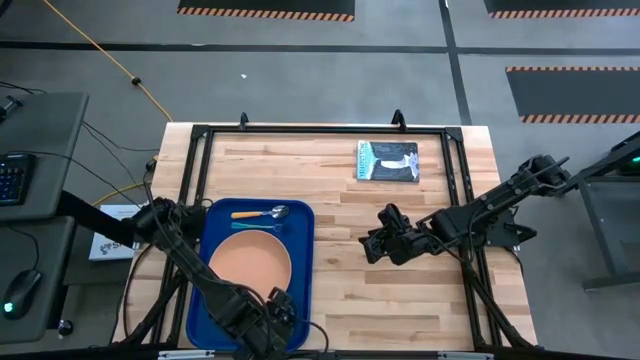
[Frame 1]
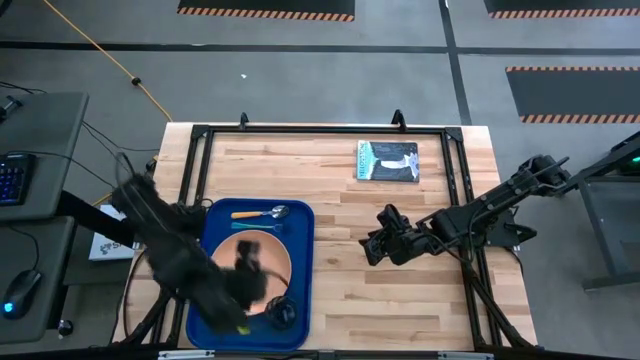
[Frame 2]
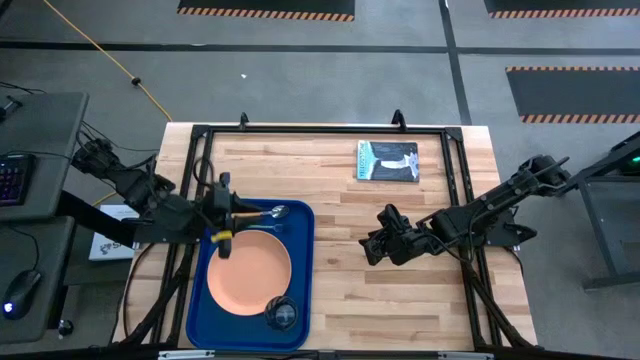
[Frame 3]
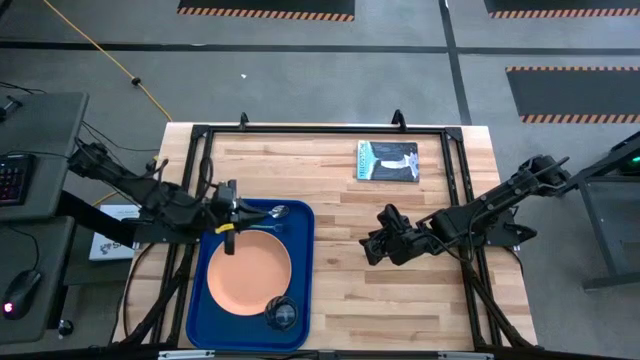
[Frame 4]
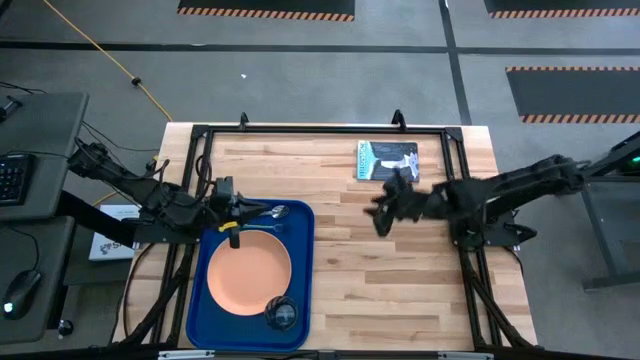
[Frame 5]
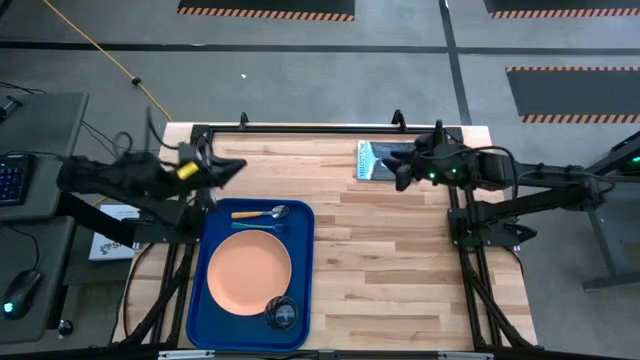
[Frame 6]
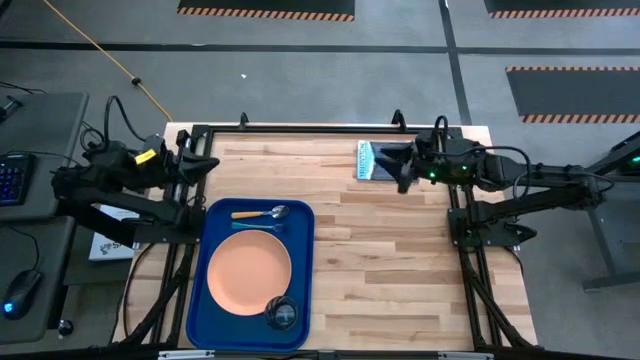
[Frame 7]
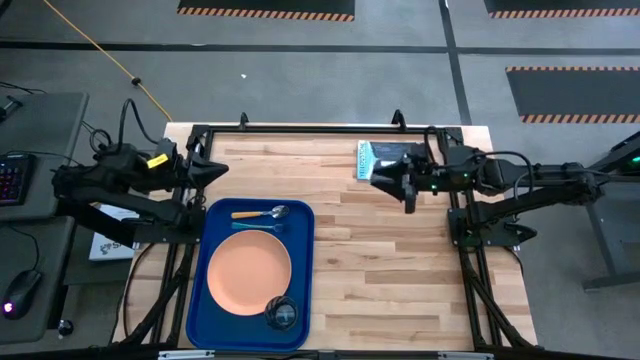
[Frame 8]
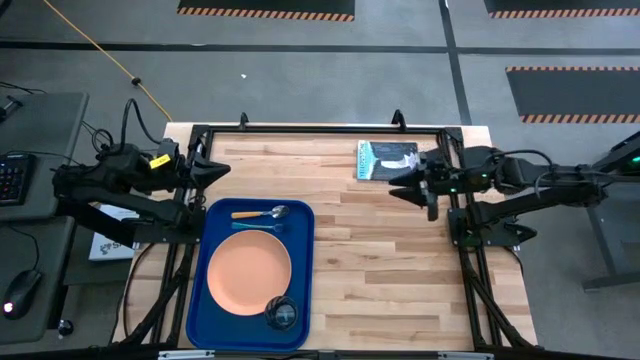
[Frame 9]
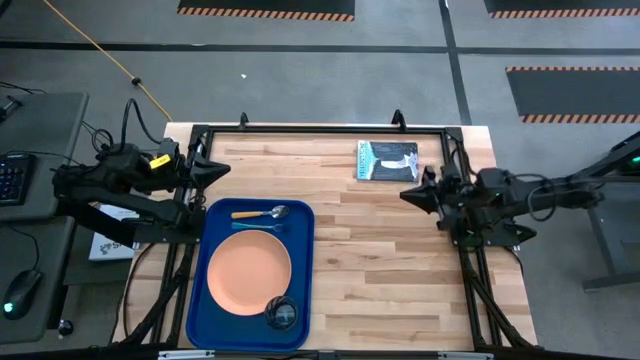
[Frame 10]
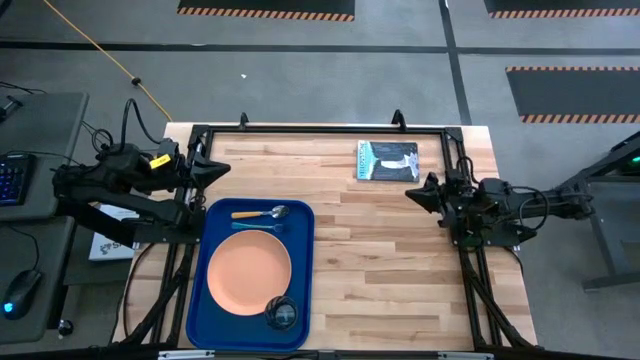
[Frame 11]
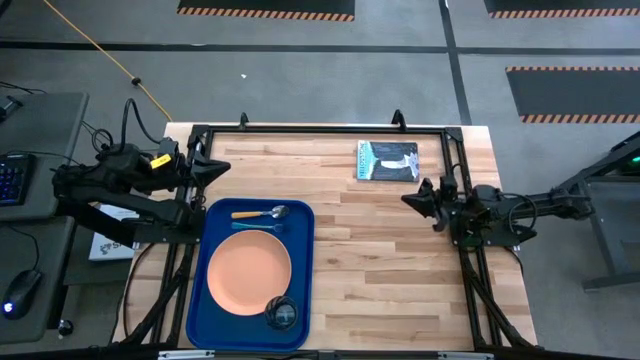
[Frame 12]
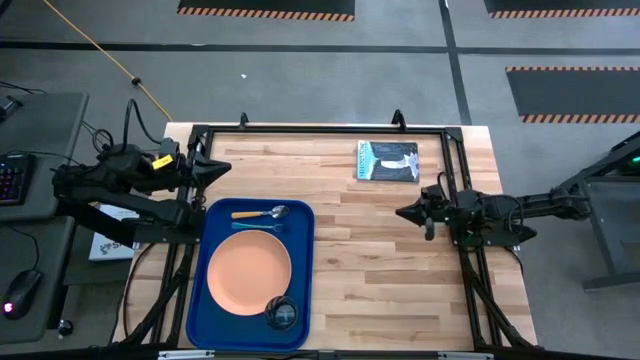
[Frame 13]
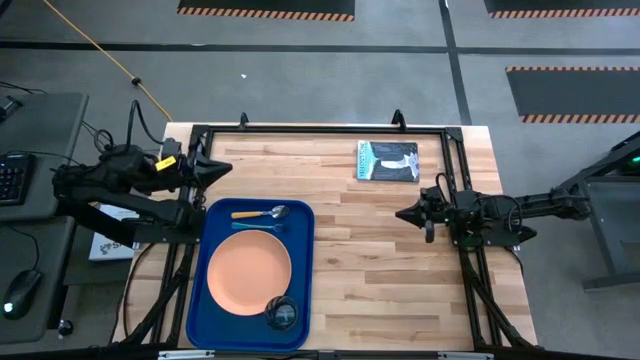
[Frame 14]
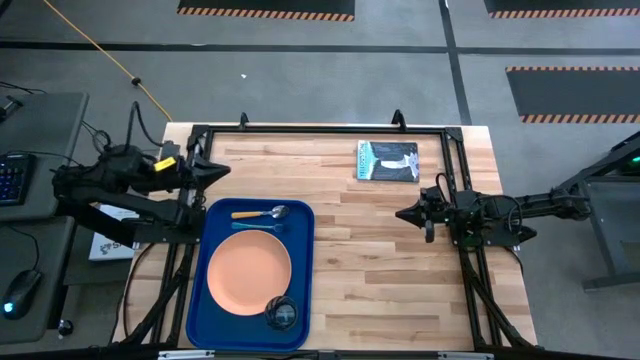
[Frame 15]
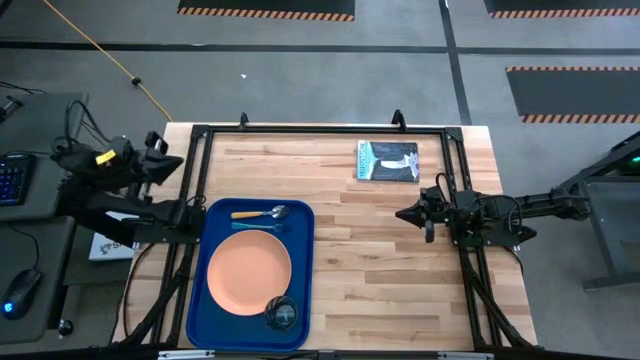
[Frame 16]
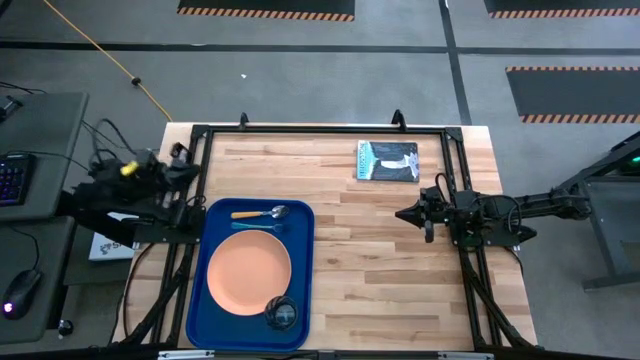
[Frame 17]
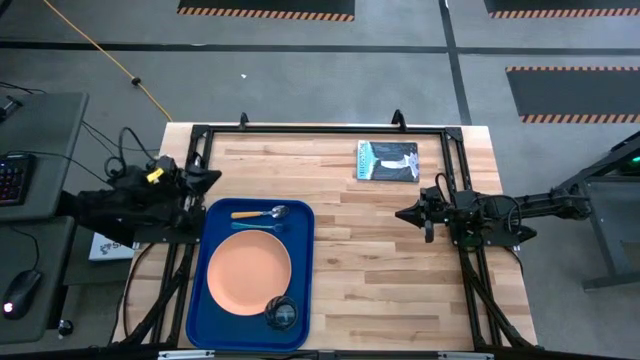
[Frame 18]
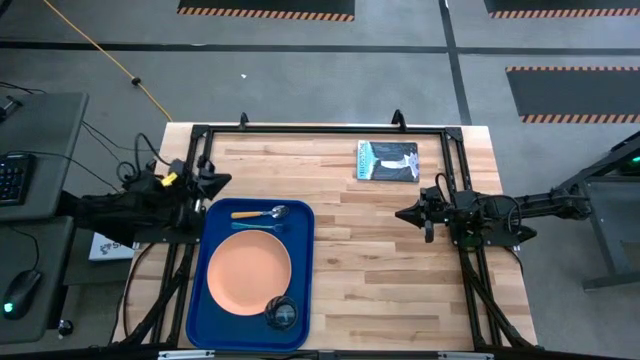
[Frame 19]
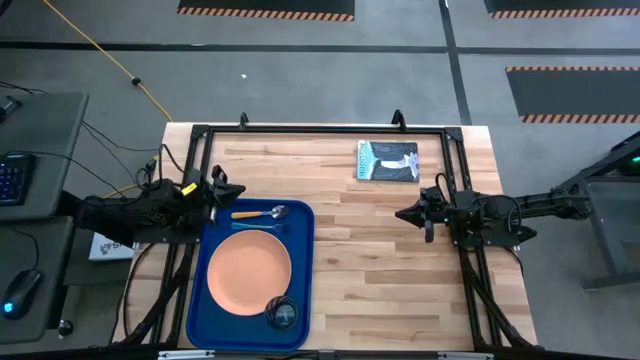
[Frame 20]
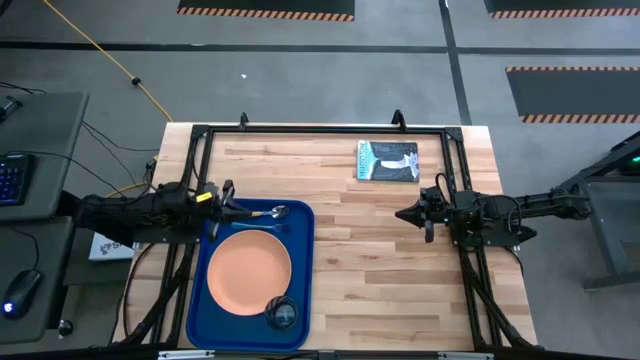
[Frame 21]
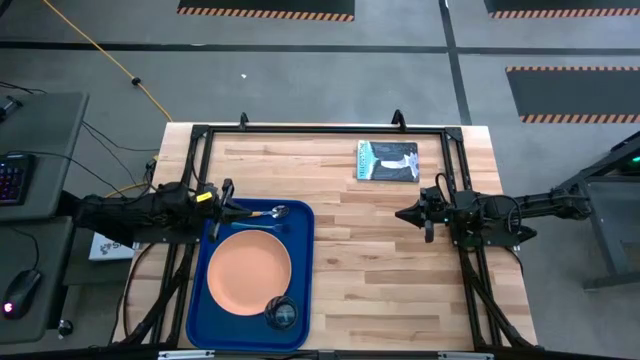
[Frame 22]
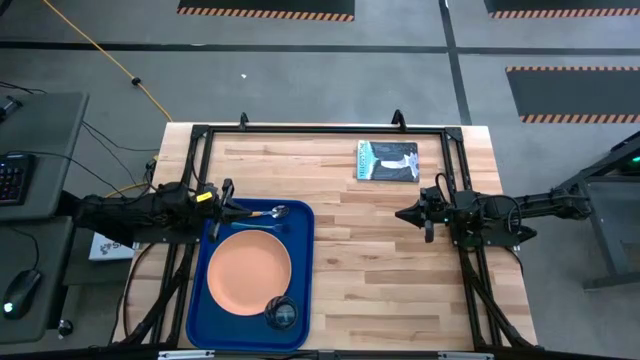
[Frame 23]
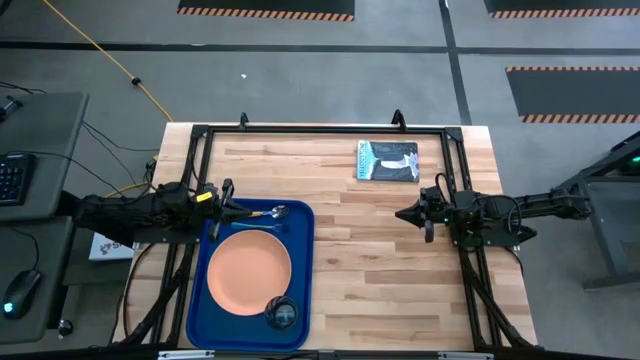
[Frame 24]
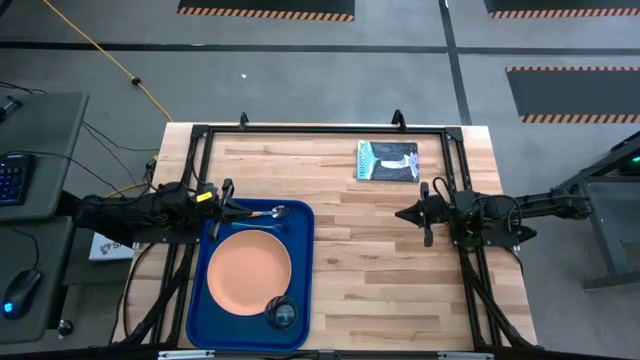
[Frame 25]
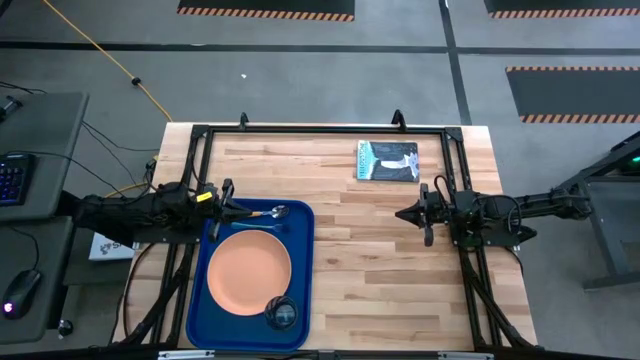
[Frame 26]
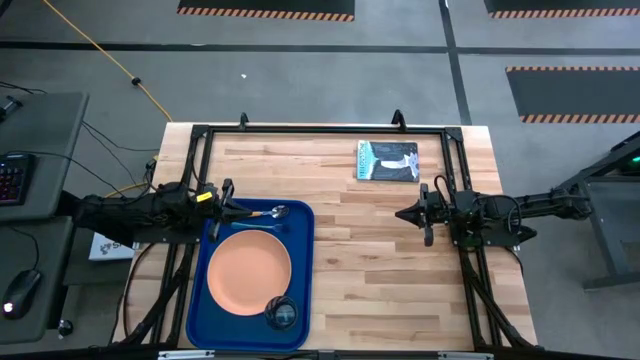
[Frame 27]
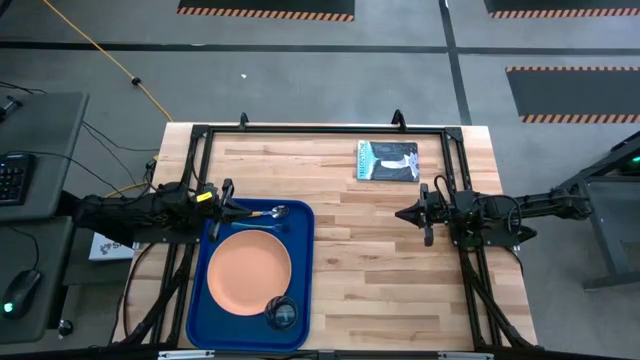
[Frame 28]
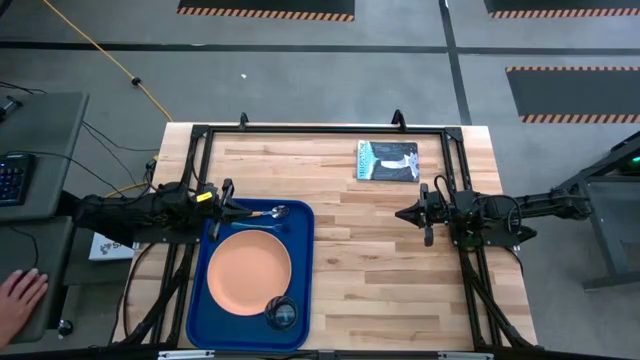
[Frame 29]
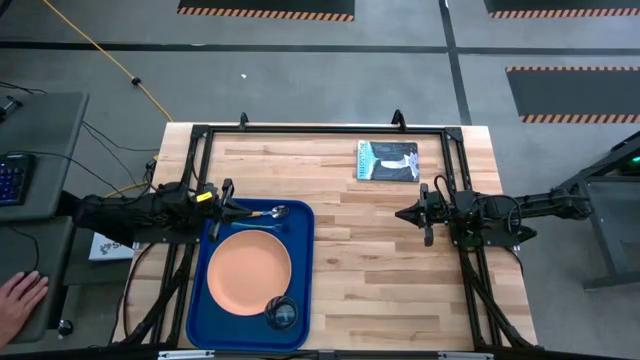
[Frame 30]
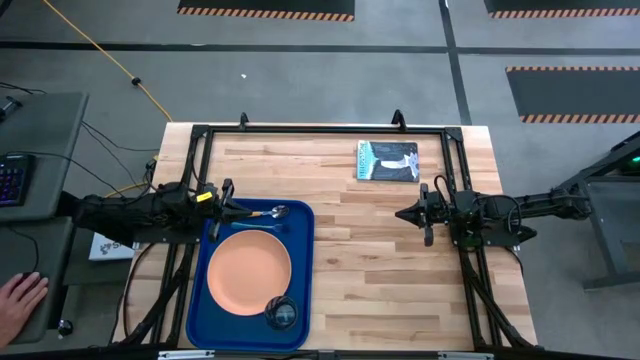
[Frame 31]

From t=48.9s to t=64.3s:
Task: Pick and place plate/cup/fork/spoon on tray
Return to Home Position

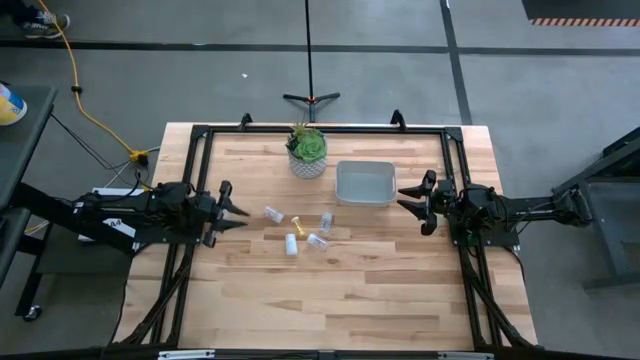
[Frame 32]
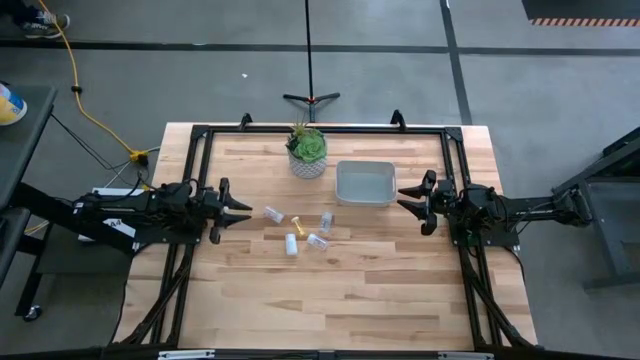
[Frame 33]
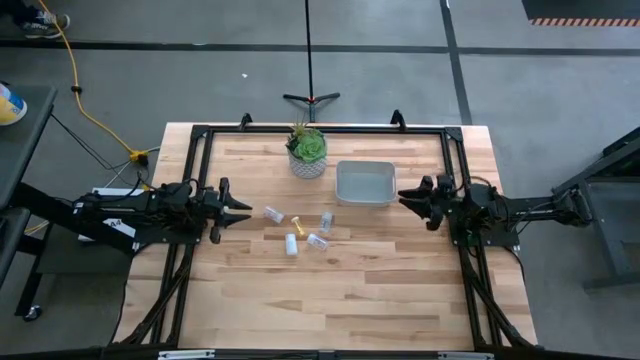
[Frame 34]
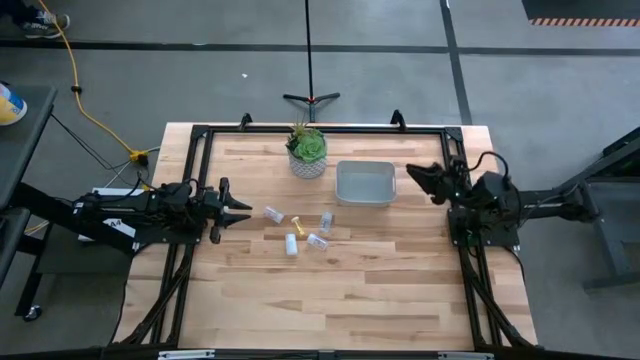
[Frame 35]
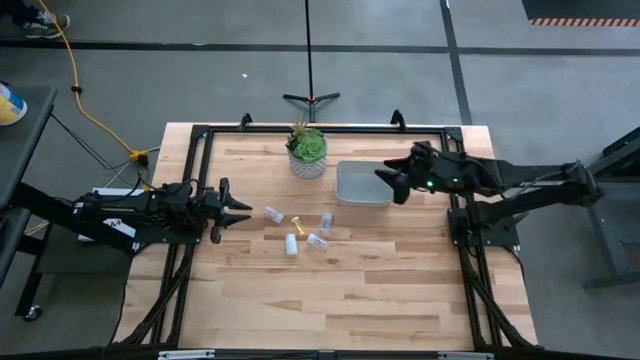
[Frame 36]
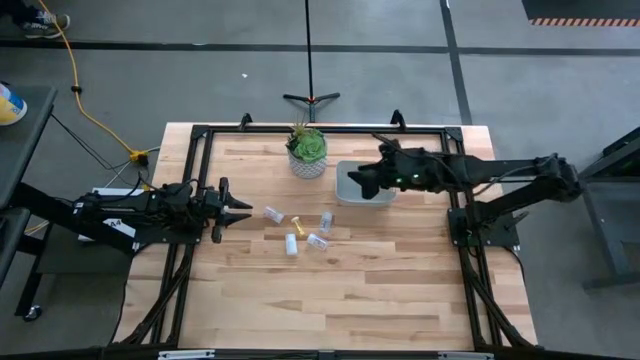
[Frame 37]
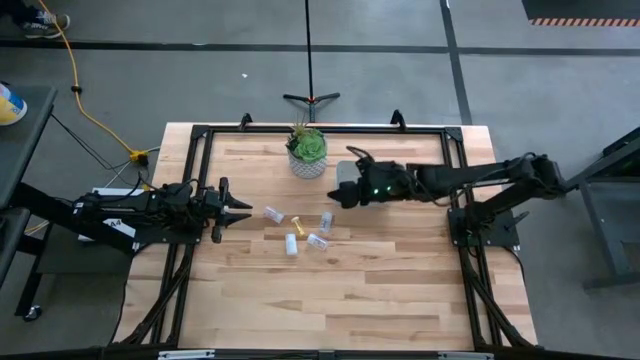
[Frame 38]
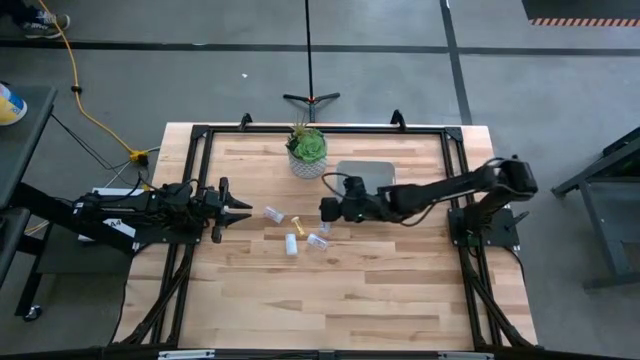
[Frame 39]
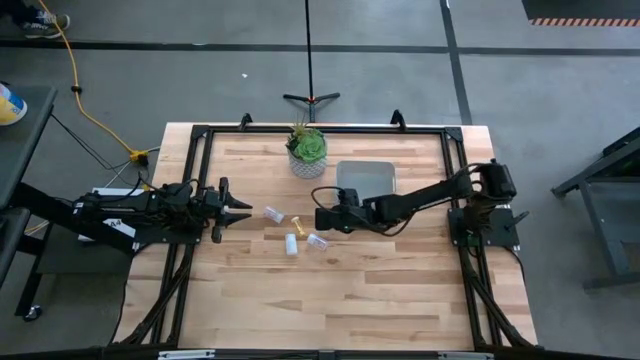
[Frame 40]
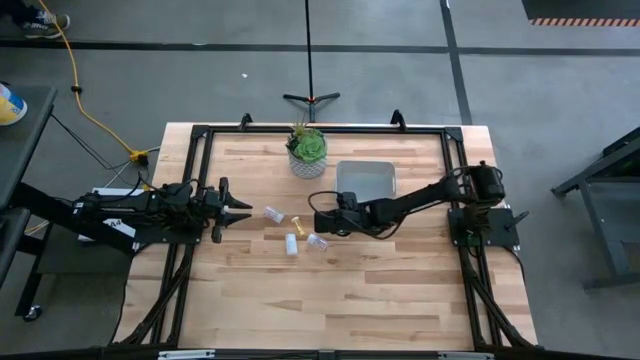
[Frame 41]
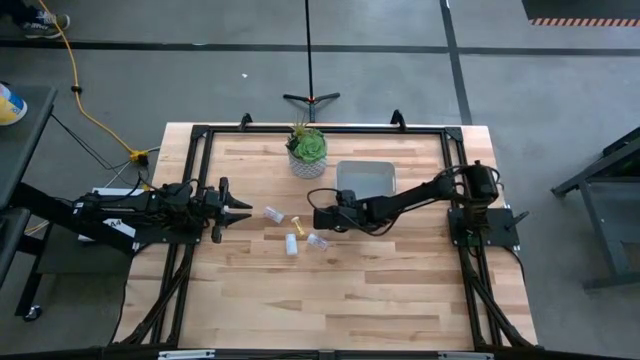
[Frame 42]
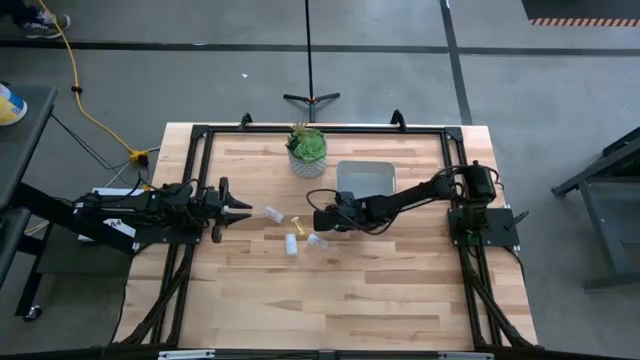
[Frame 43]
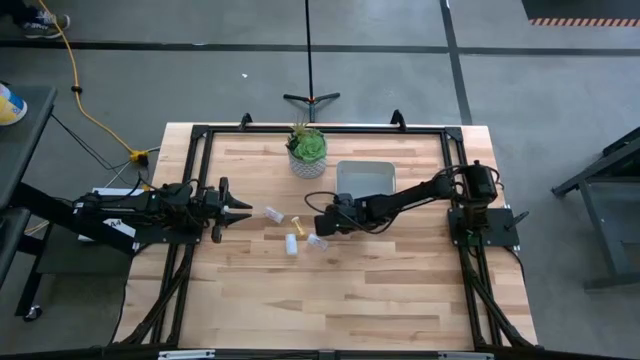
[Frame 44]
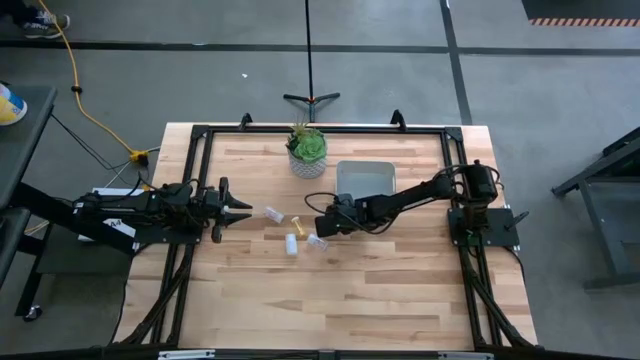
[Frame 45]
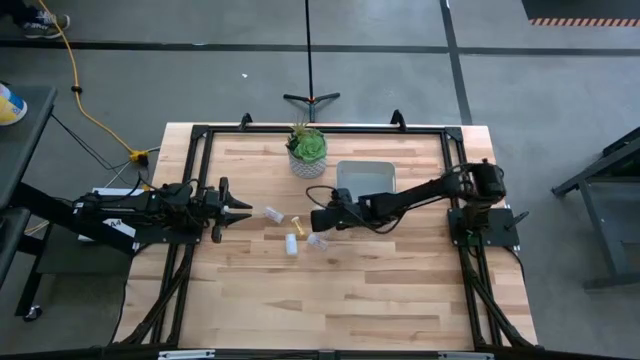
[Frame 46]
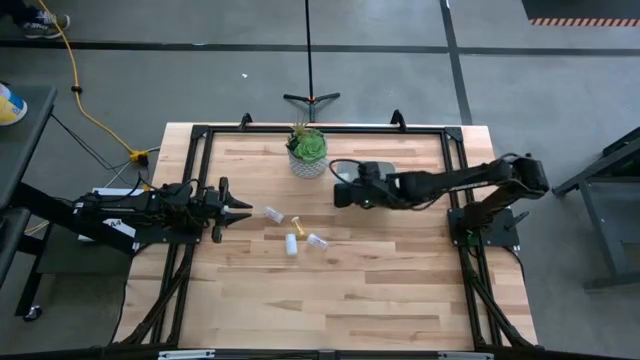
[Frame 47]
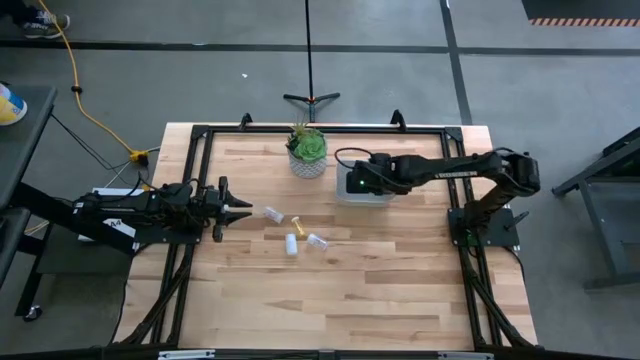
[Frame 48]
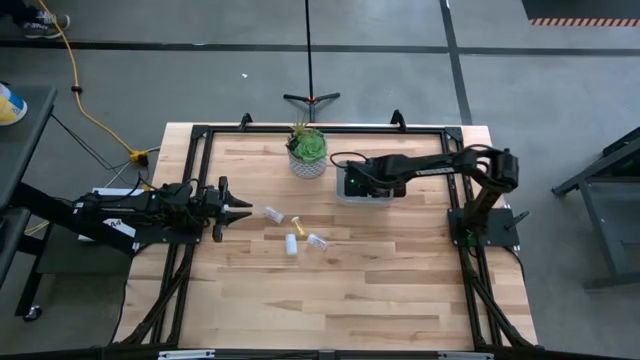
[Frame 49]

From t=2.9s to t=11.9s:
Task: Pick and place pill bottles into a basket
Put the transparent medicine bottle into the gray bin
